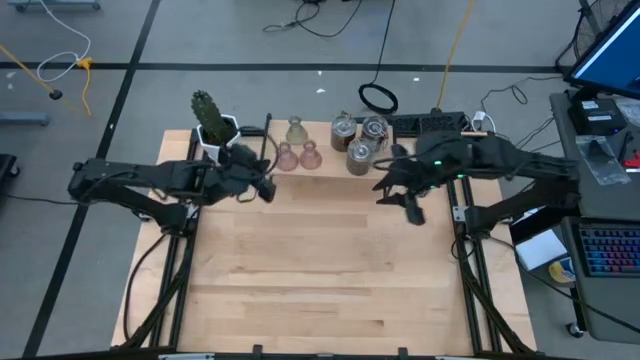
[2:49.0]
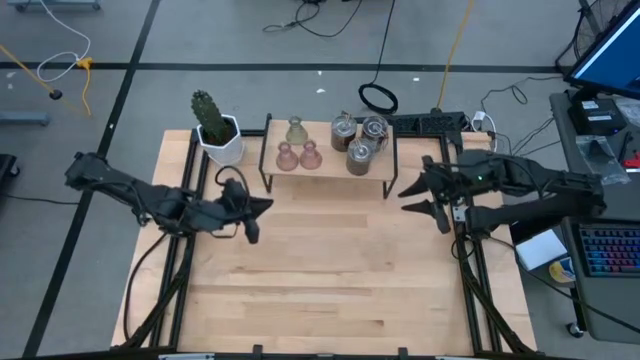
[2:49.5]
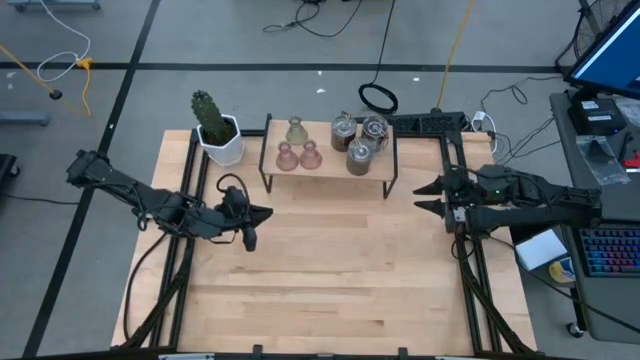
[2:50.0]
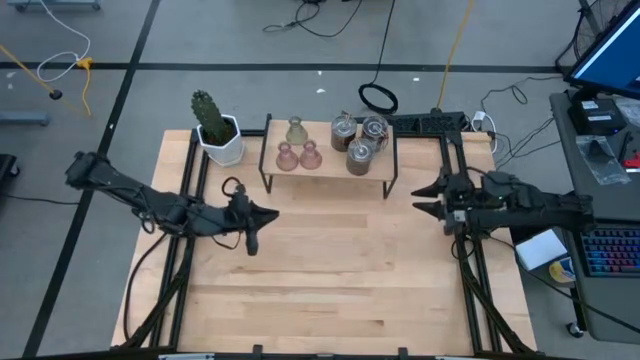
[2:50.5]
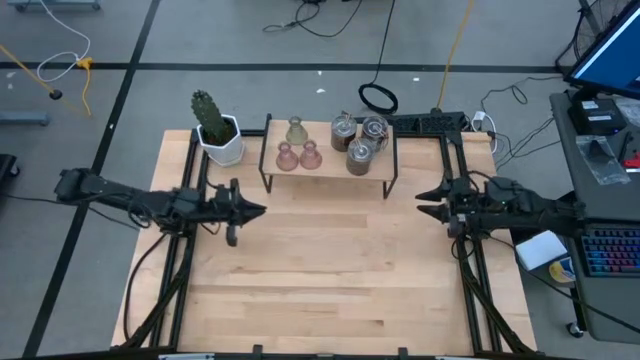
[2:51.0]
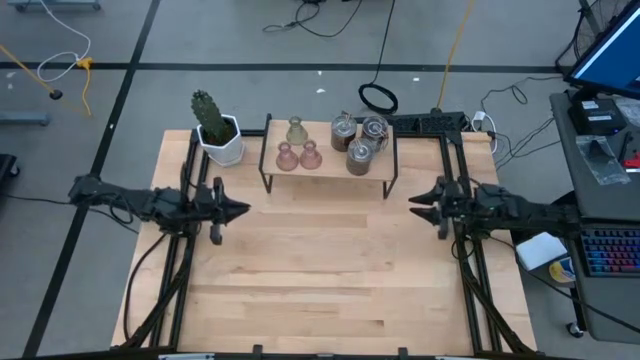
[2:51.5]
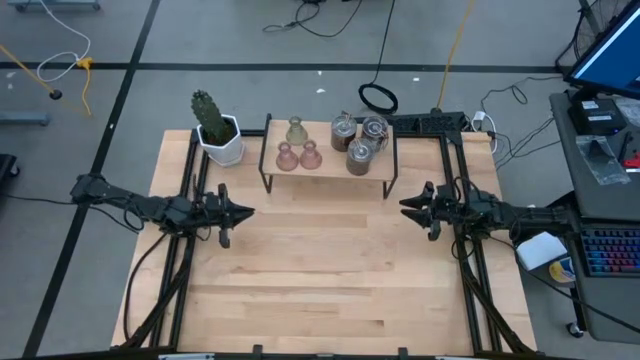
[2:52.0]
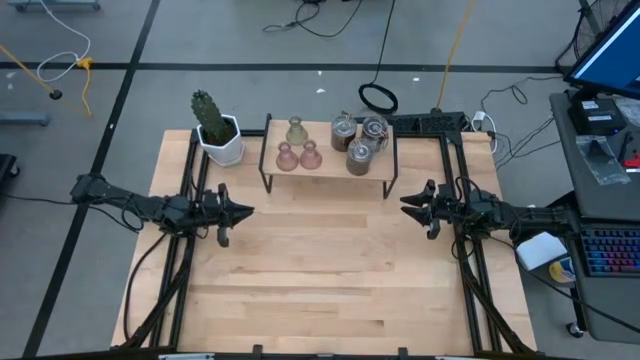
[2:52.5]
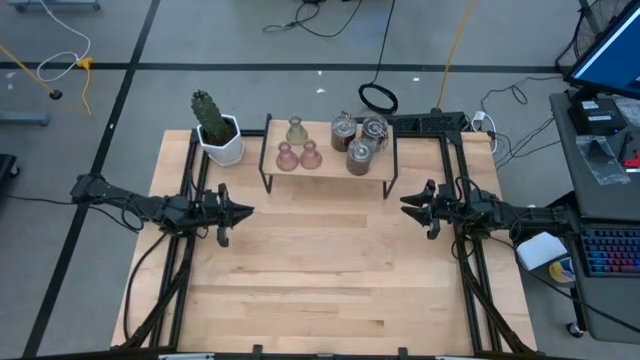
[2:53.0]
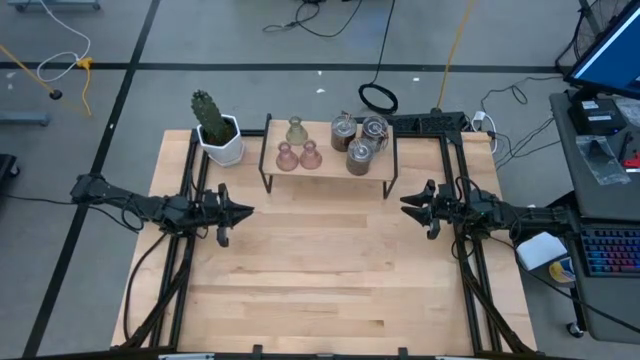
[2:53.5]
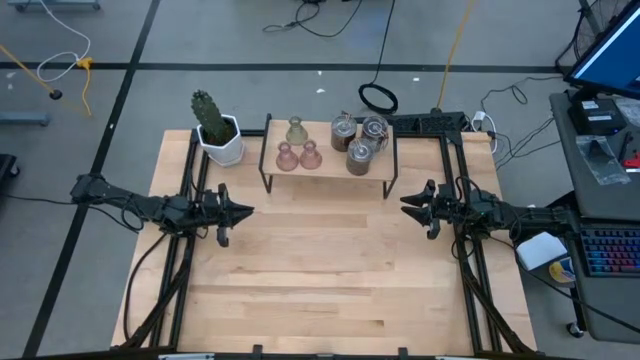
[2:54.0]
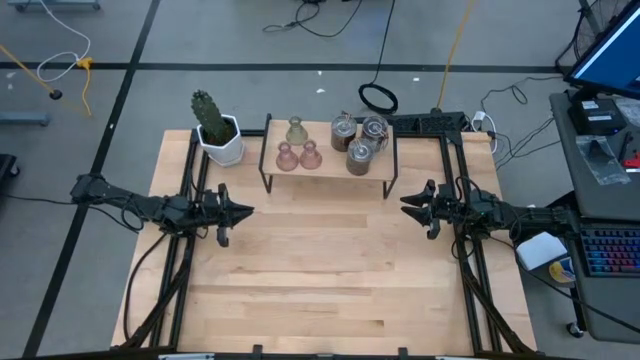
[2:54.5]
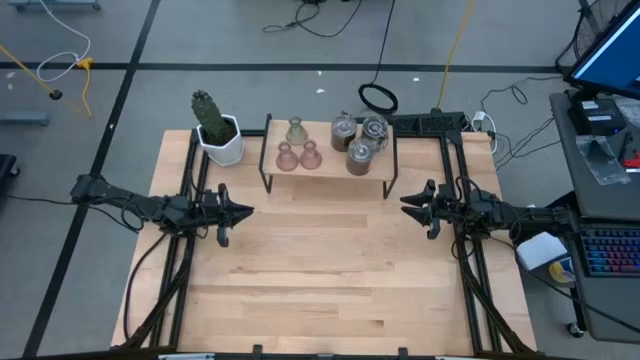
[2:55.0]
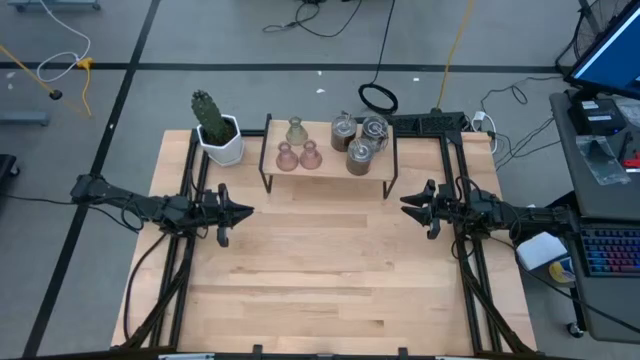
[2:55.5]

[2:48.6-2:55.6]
Task: Pick & Place candle stick holders
Return to Home Position

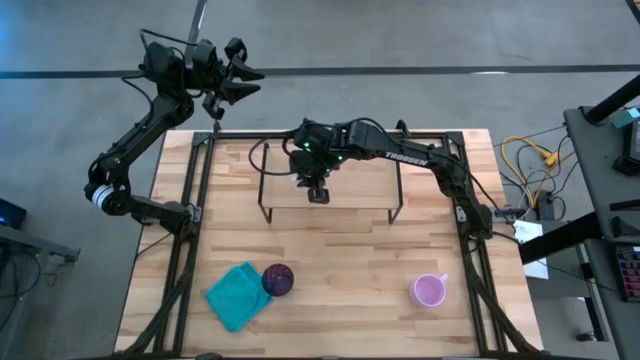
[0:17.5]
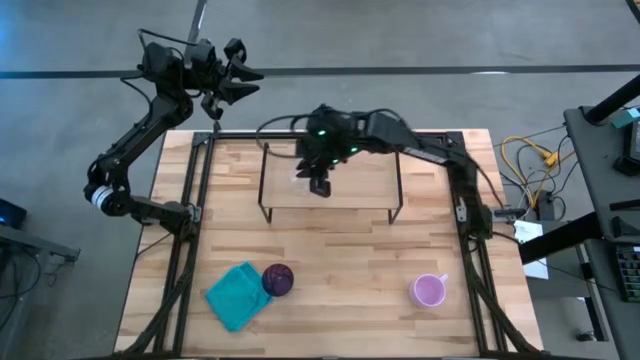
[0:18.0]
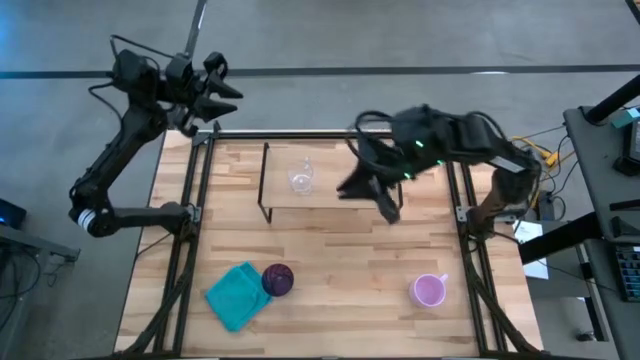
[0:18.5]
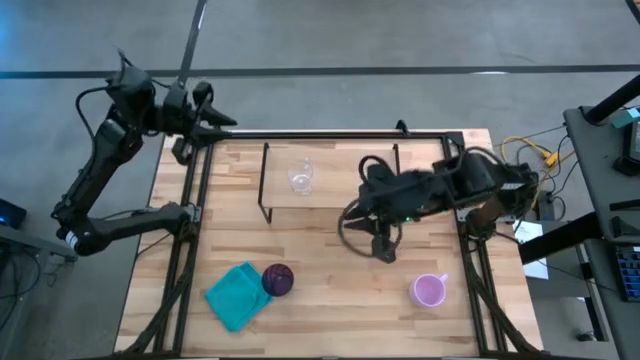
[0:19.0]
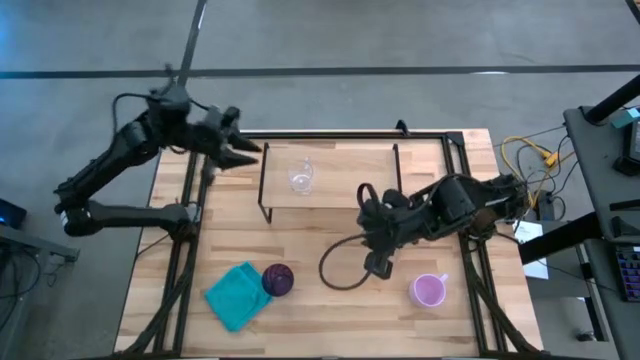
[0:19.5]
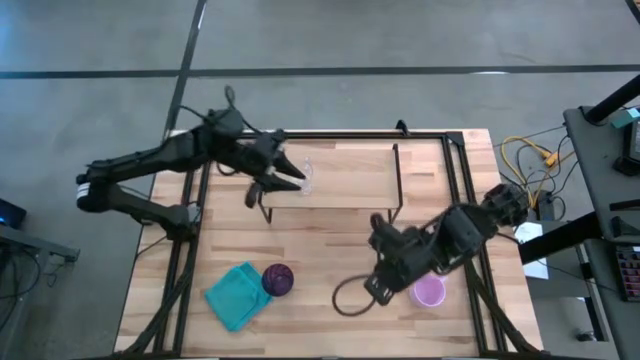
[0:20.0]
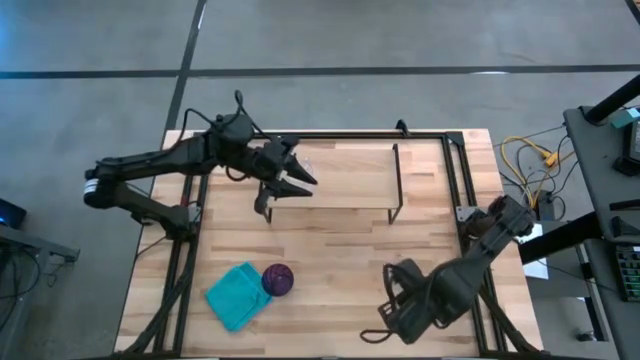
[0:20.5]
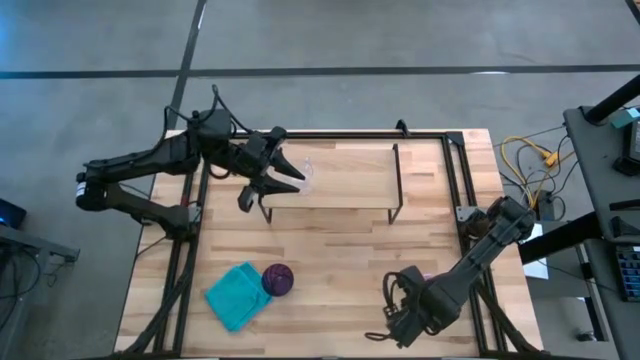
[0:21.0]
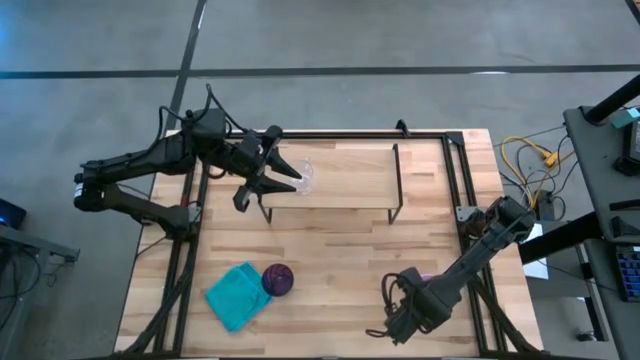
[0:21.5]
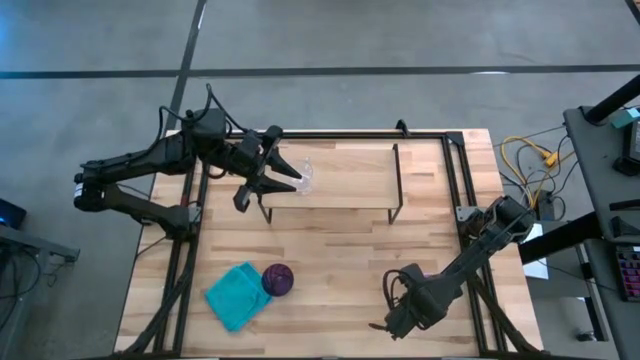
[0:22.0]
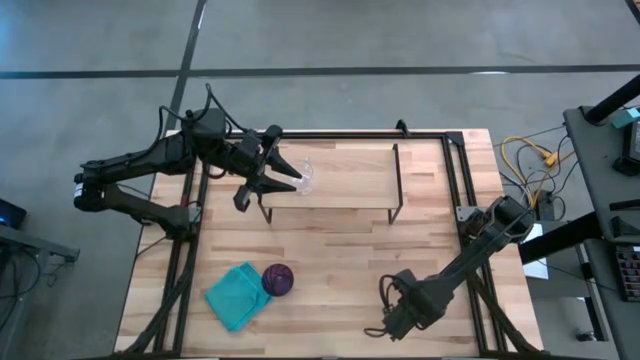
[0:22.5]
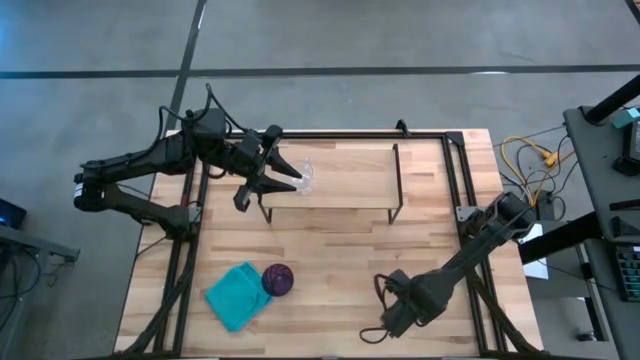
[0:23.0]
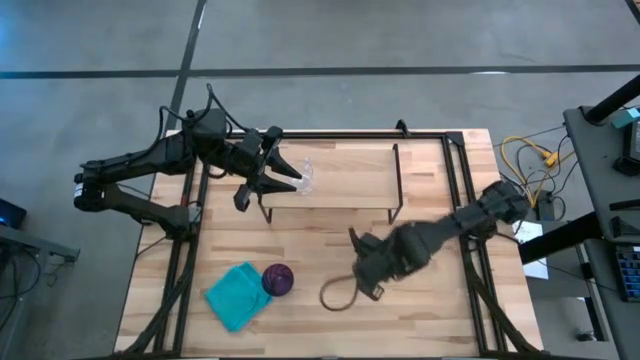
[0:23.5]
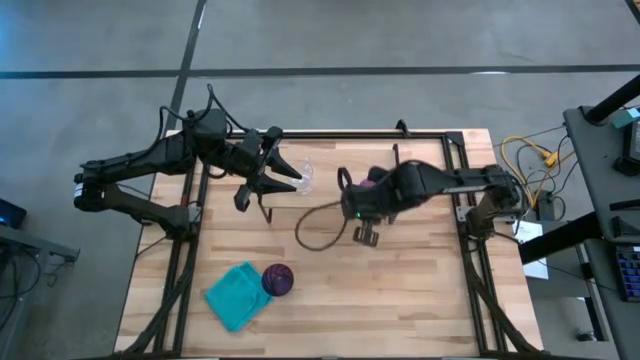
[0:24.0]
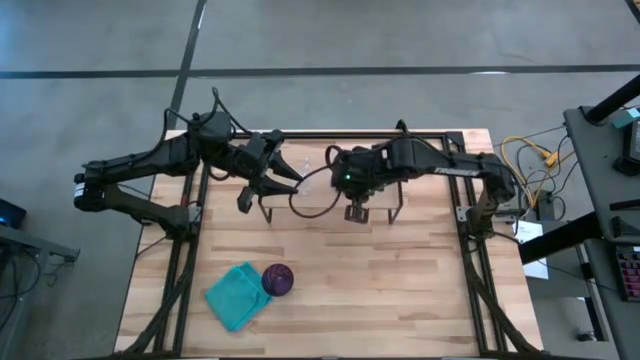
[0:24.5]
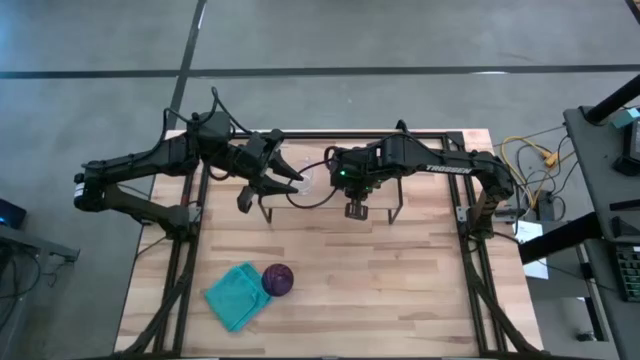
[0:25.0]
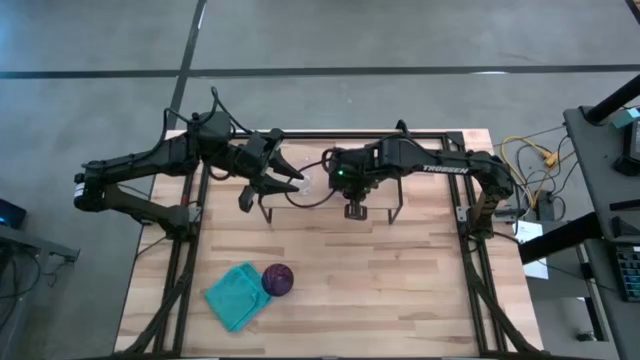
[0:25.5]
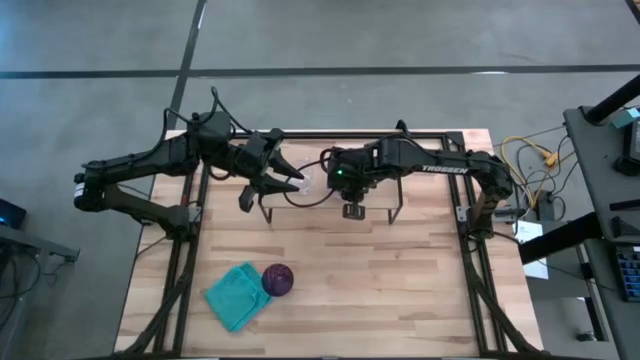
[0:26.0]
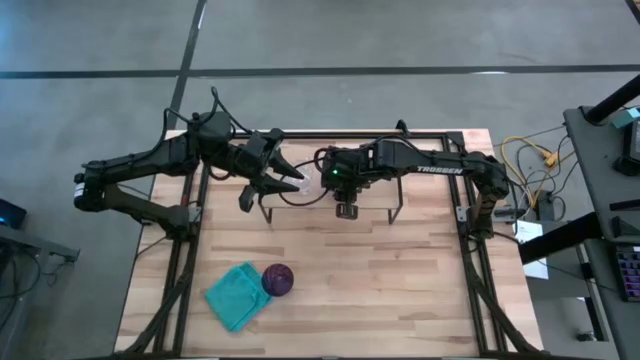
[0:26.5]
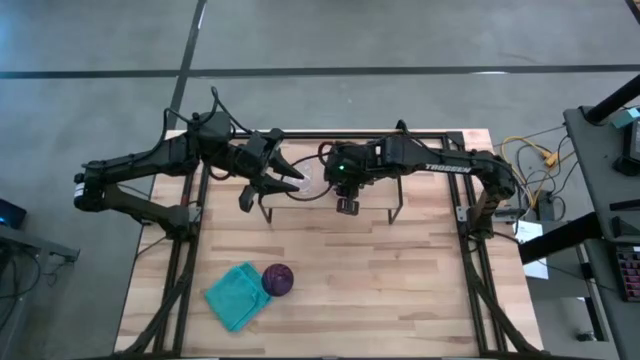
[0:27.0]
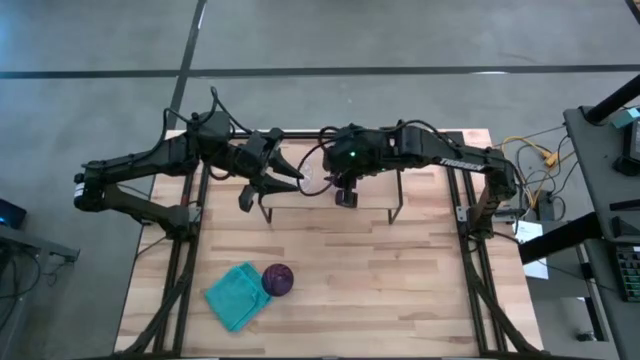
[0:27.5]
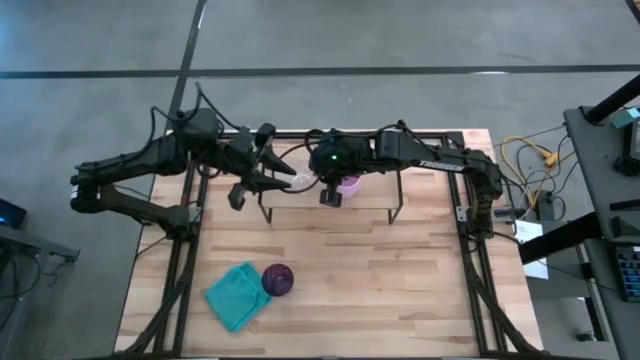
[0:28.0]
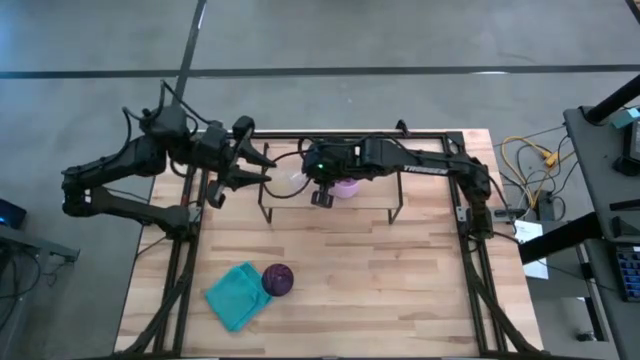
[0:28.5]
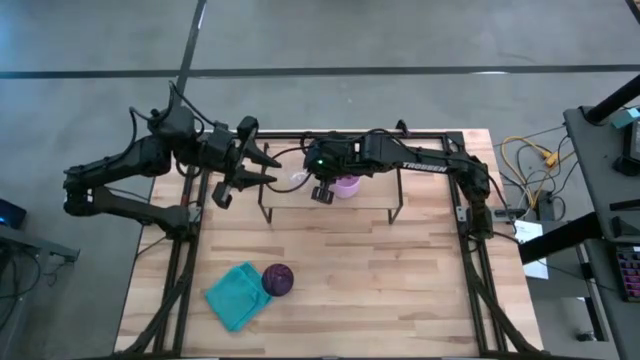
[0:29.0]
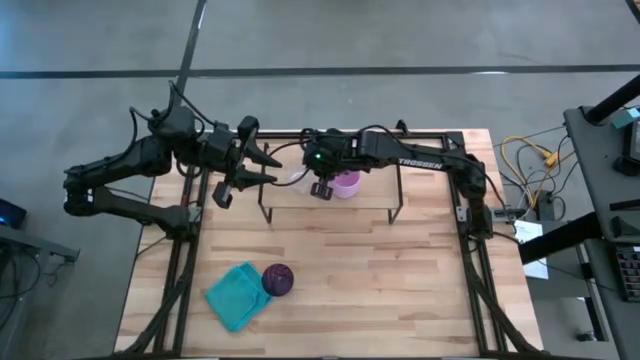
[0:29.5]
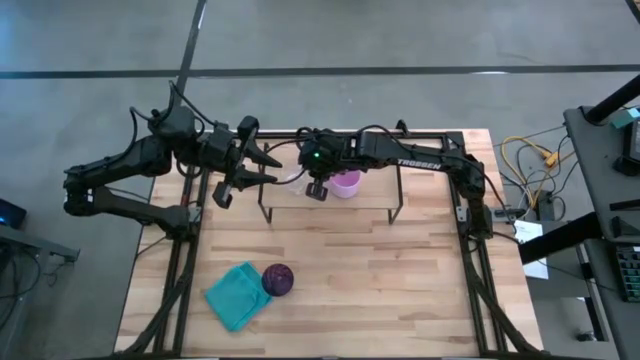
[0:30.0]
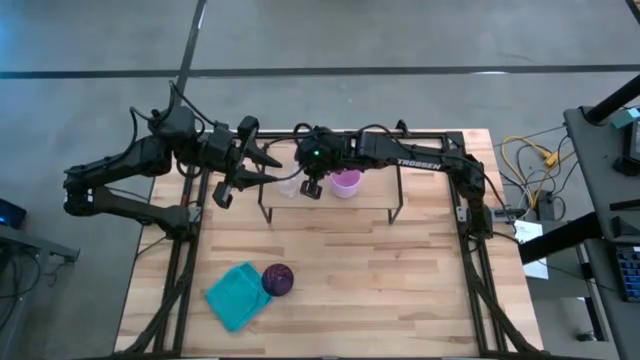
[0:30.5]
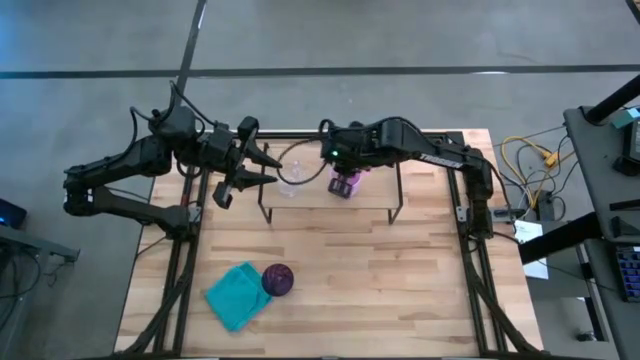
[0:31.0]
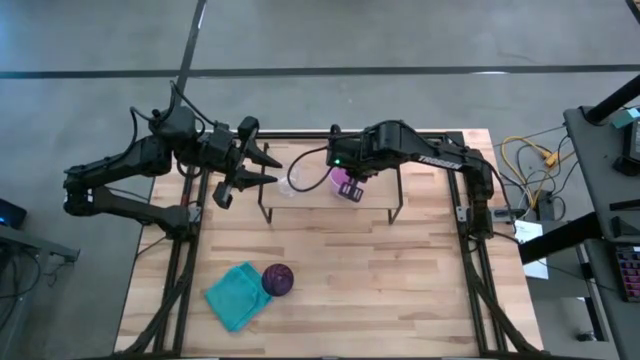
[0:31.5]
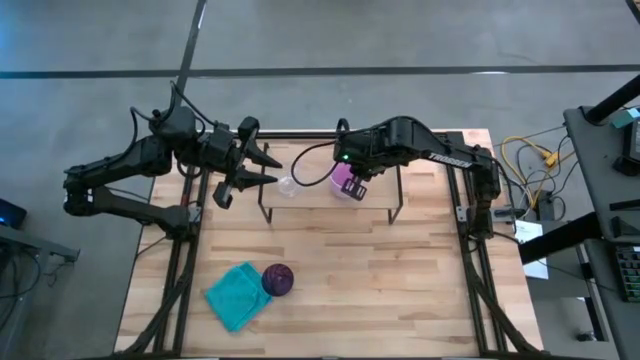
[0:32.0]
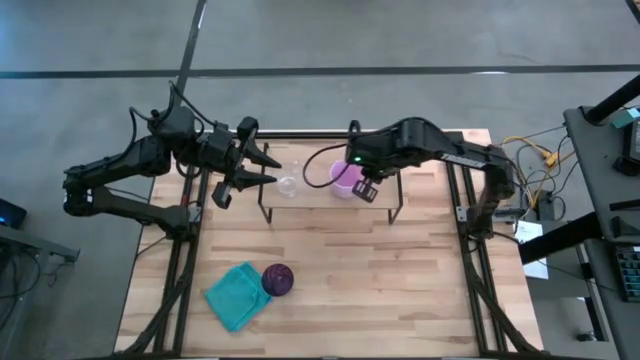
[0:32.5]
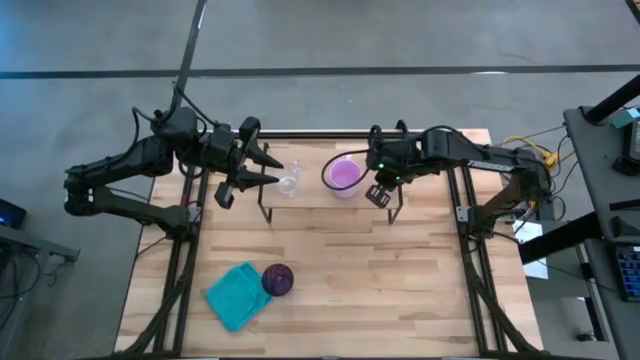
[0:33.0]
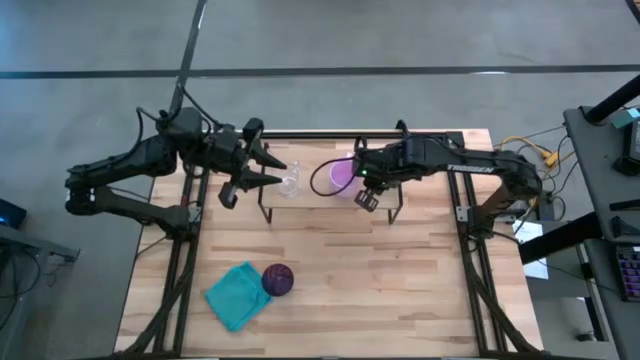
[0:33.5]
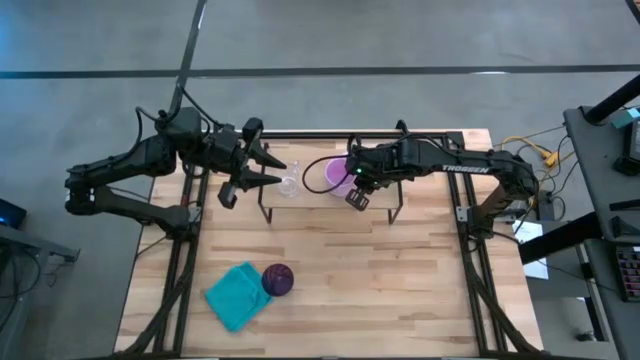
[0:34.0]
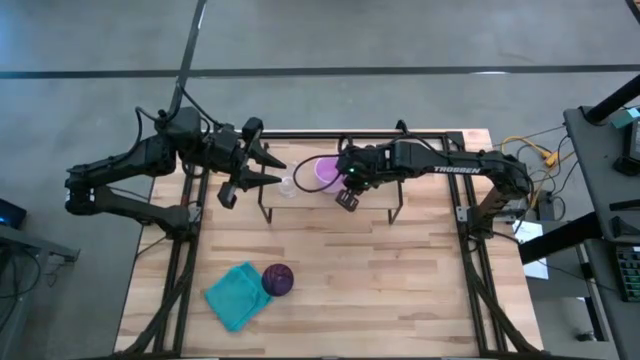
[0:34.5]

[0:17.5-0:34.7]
Task: Stack small to large cups/mugs on shelf
Put the pink mug on the shelf
